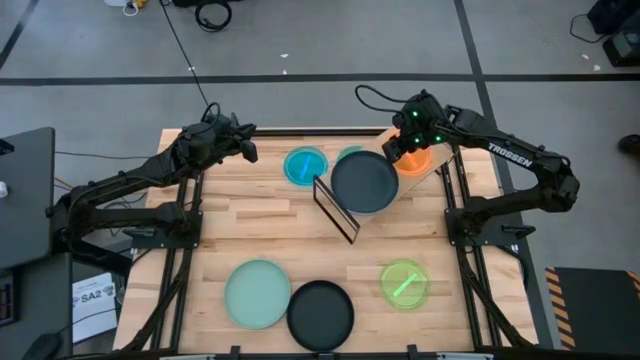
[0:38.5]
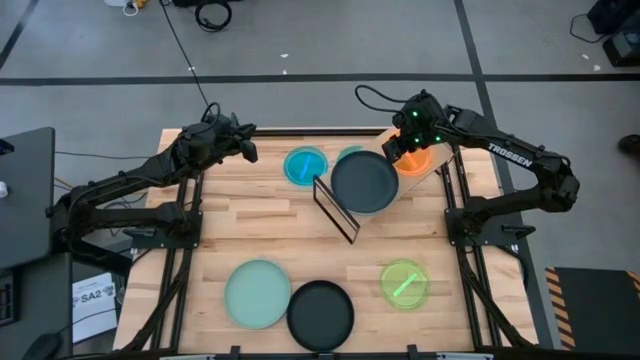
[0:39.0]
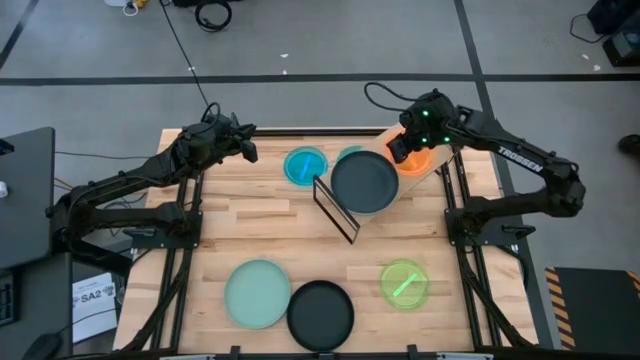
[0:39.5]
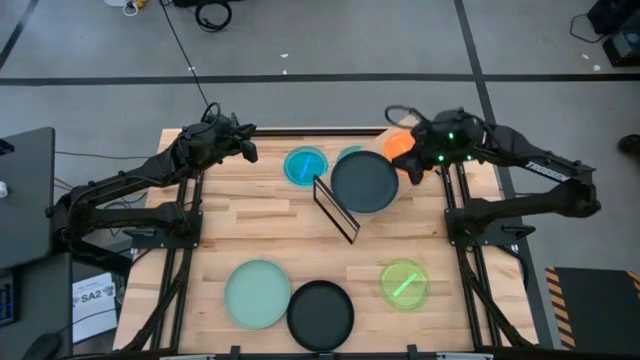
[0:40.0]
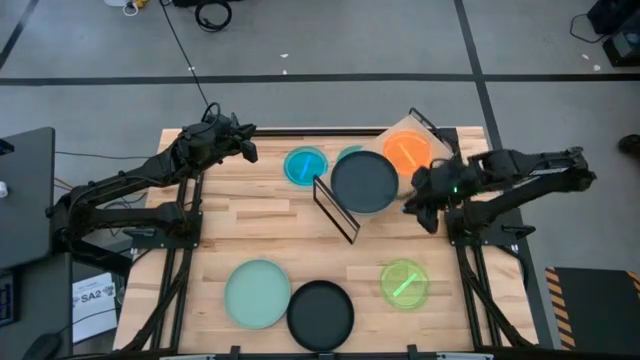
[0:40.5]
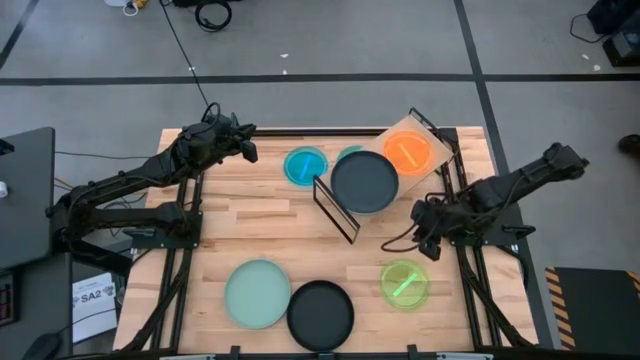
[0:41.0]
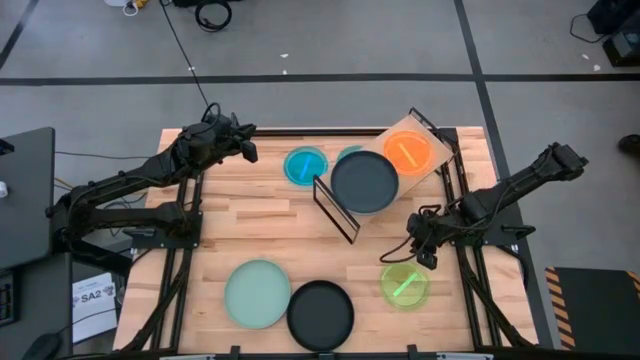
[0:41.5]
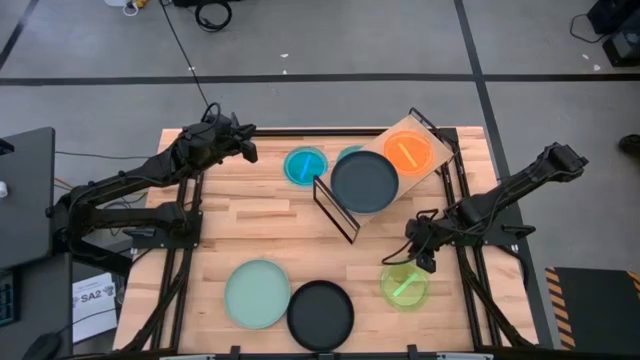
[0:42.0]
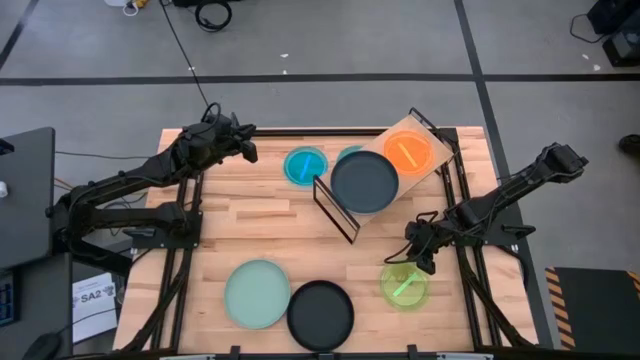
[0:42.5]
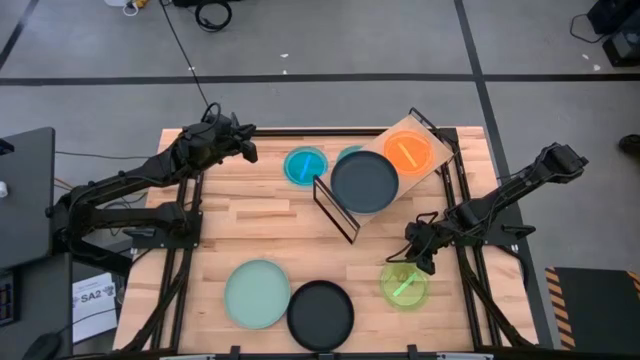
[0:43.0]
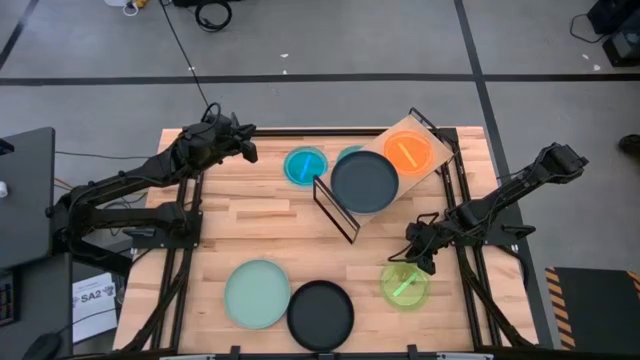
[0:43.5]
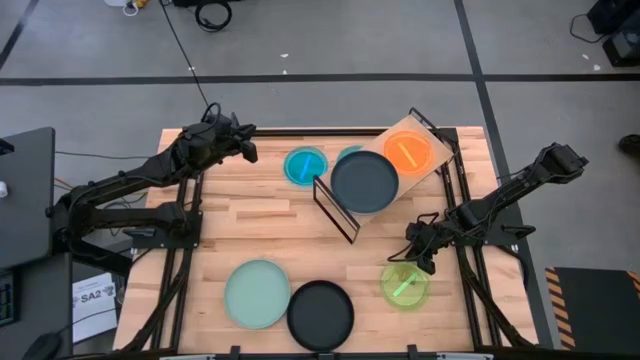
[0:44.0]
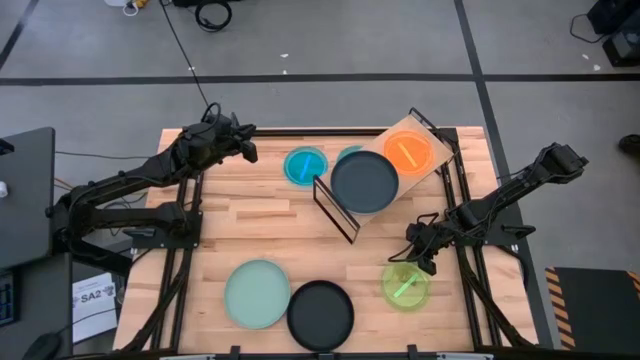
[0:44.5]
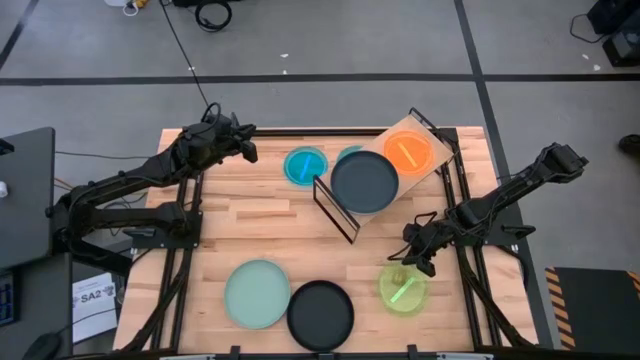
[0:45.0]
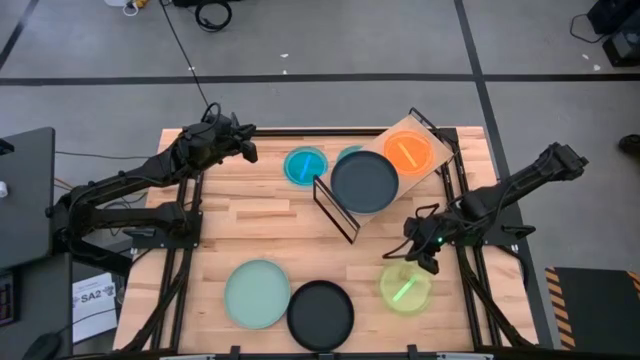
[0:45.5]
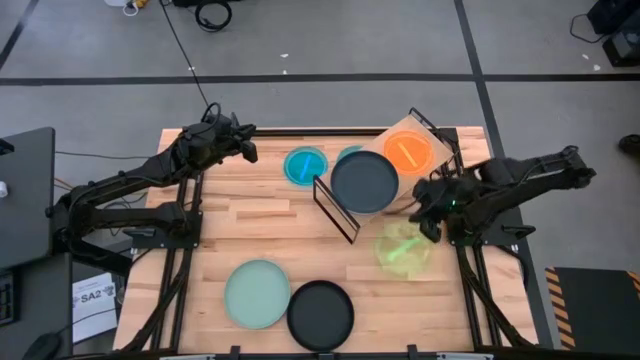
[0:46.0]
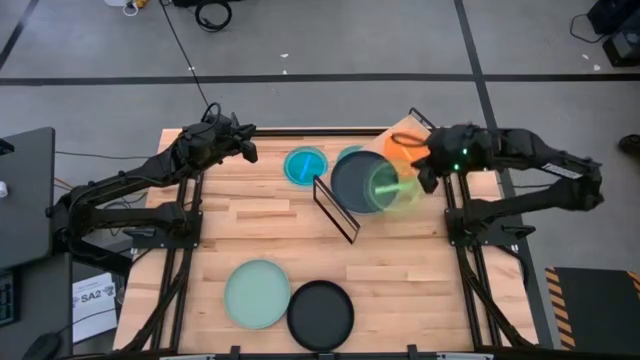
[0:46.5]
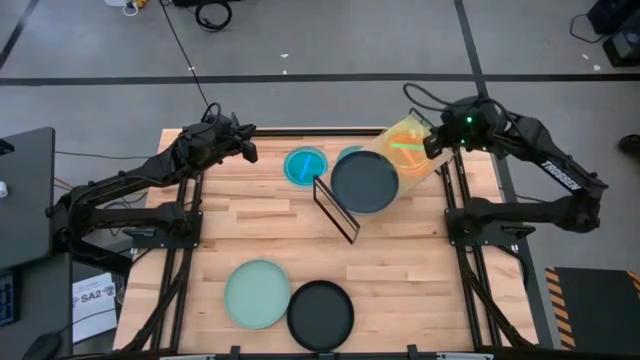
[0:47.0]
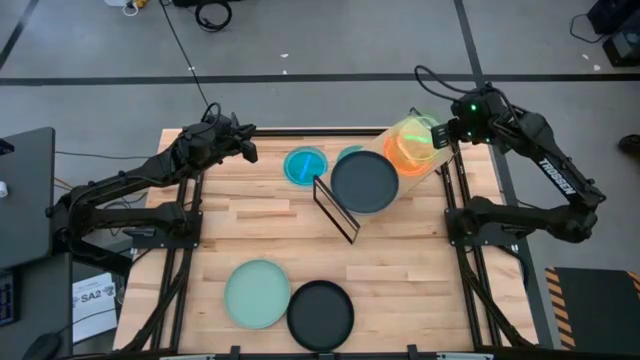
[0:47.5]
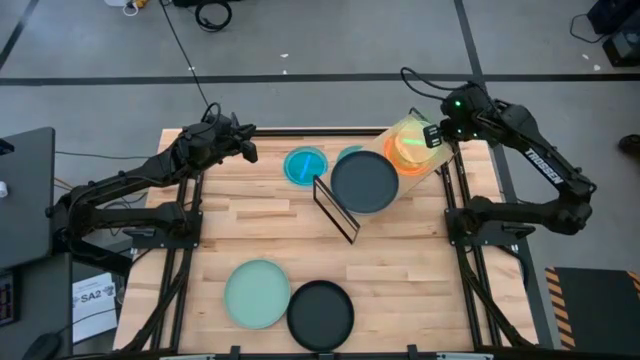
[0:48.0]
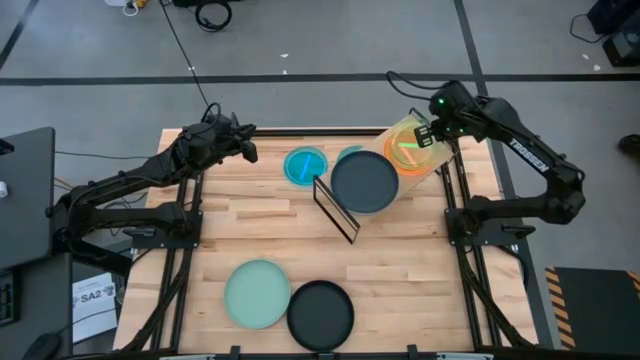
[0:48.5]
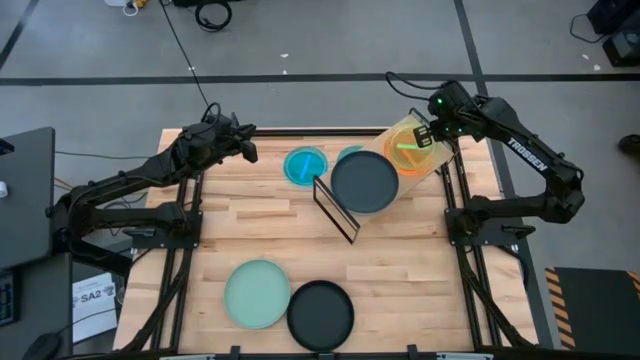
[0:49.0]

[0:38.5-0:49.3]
Task: Place and stack plates onto a shelf
Stack the small green plate on top of the transparent small orange plate on the shelf

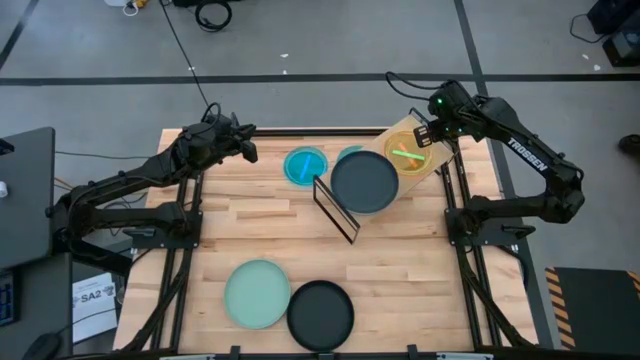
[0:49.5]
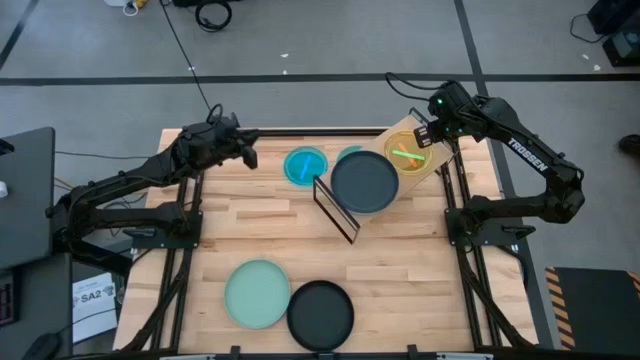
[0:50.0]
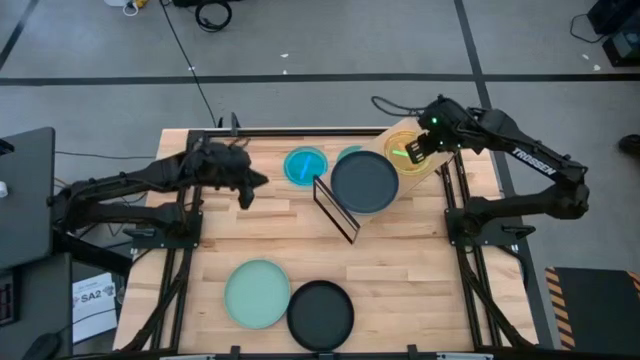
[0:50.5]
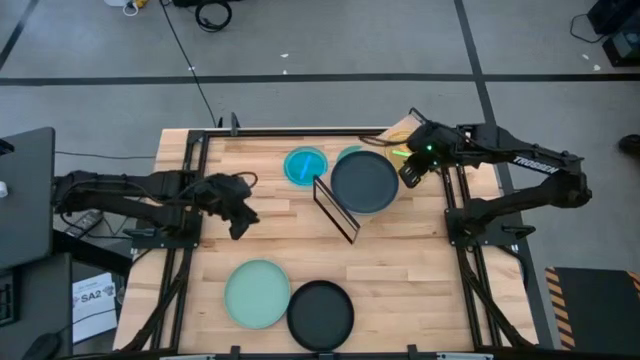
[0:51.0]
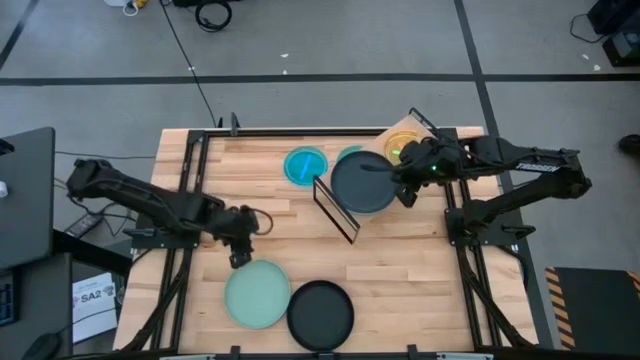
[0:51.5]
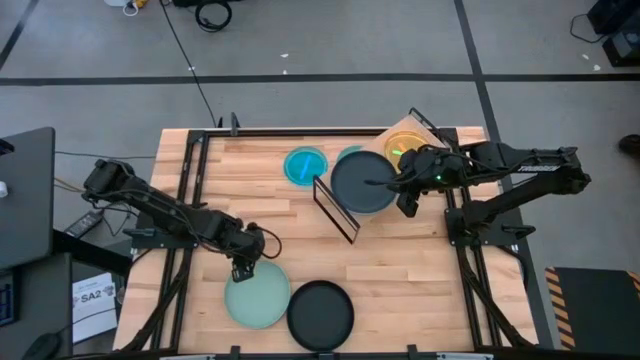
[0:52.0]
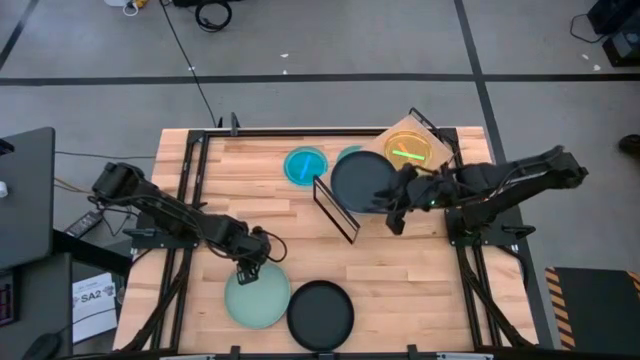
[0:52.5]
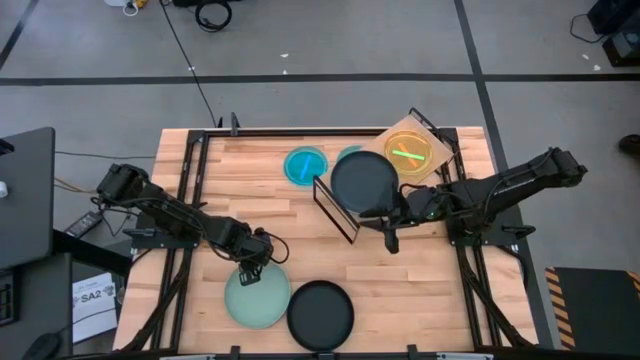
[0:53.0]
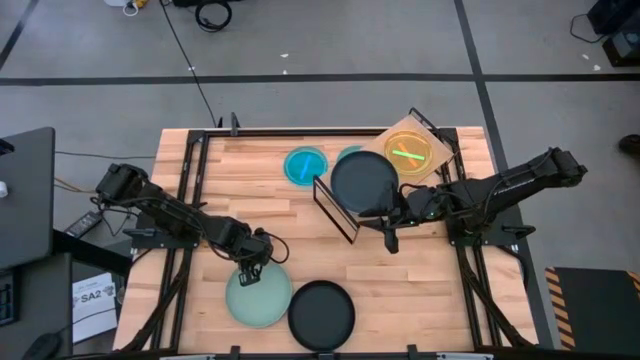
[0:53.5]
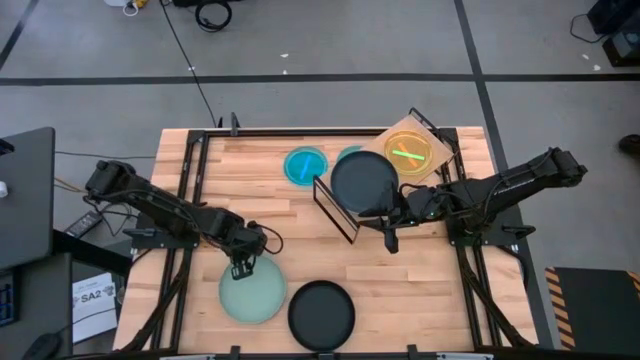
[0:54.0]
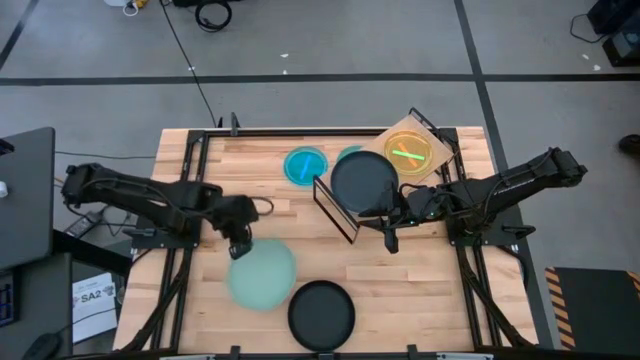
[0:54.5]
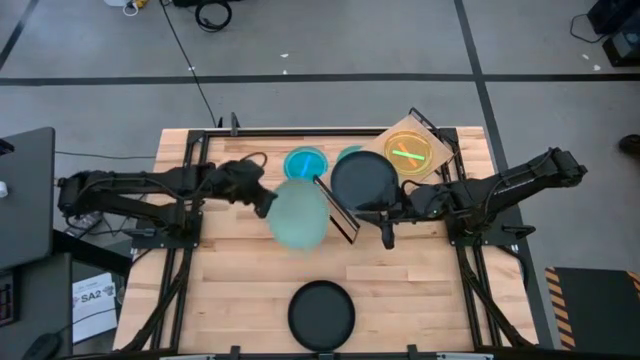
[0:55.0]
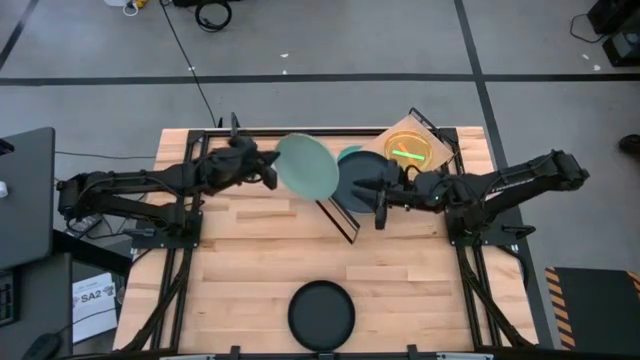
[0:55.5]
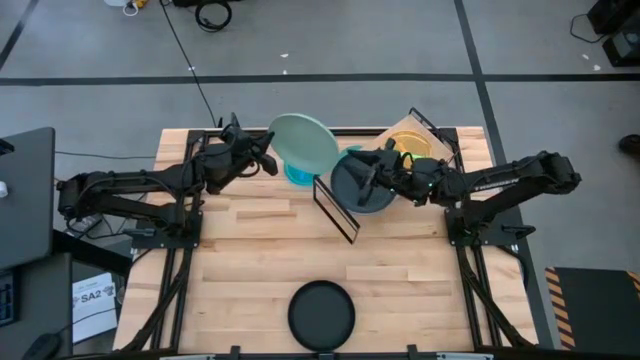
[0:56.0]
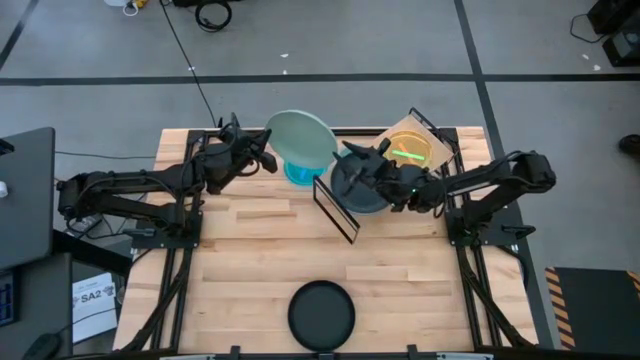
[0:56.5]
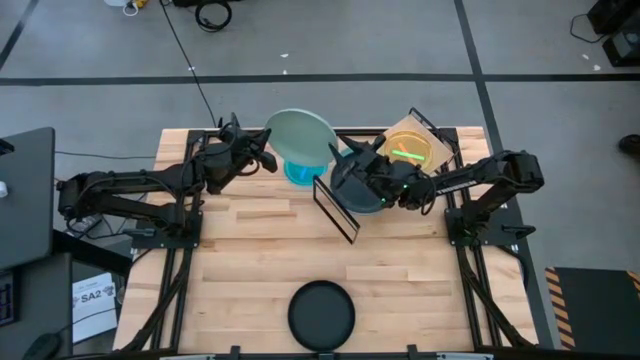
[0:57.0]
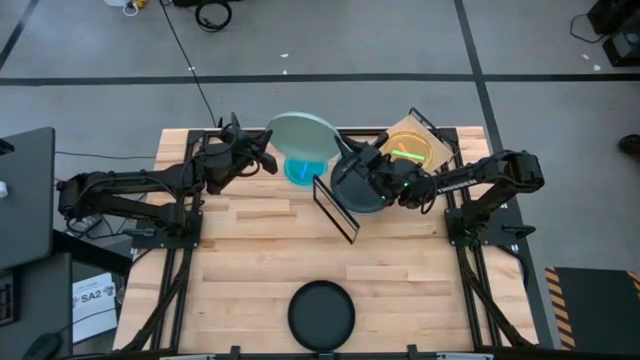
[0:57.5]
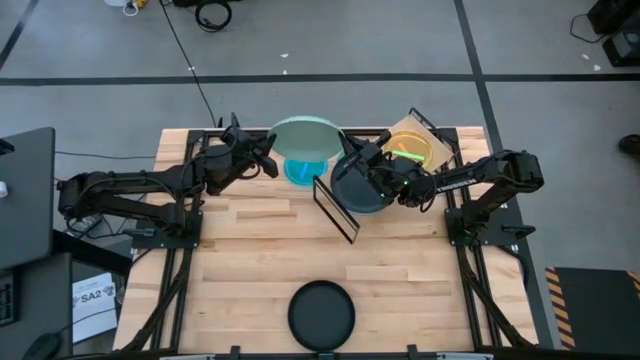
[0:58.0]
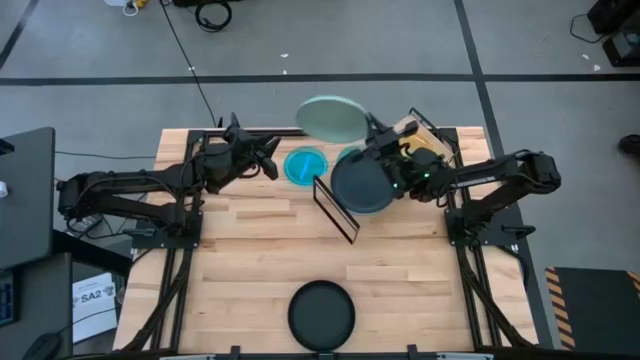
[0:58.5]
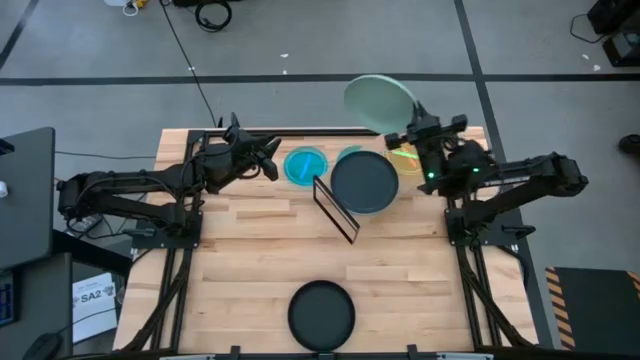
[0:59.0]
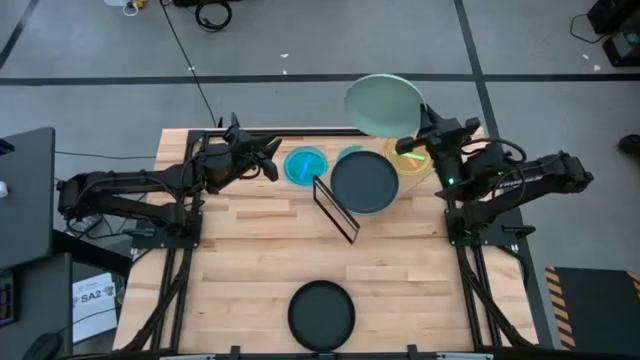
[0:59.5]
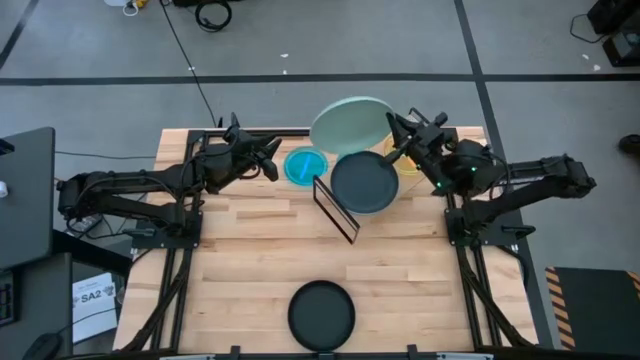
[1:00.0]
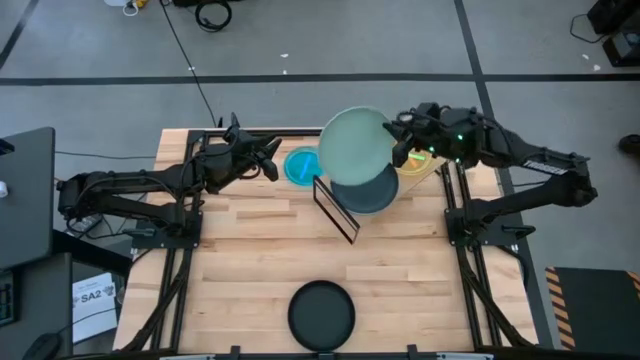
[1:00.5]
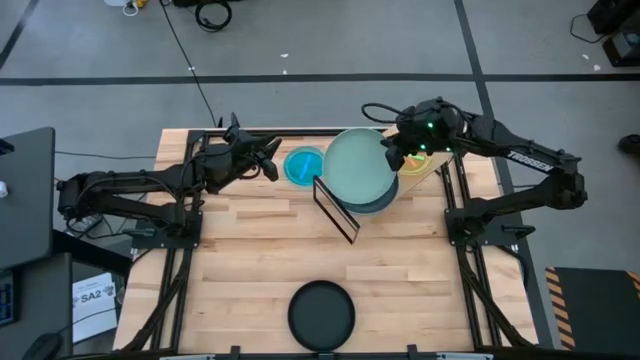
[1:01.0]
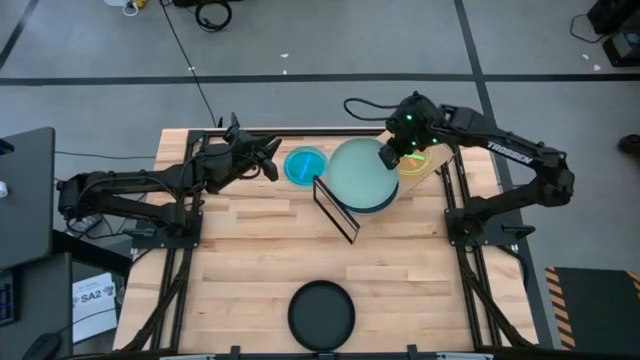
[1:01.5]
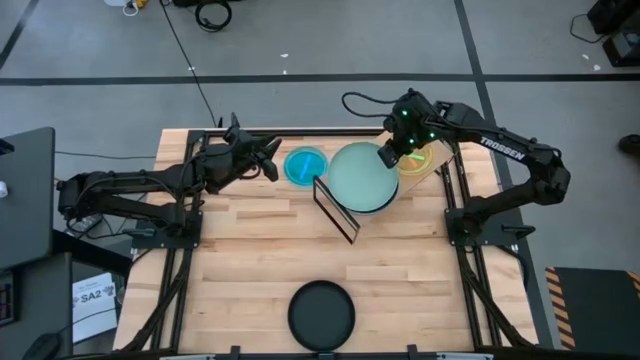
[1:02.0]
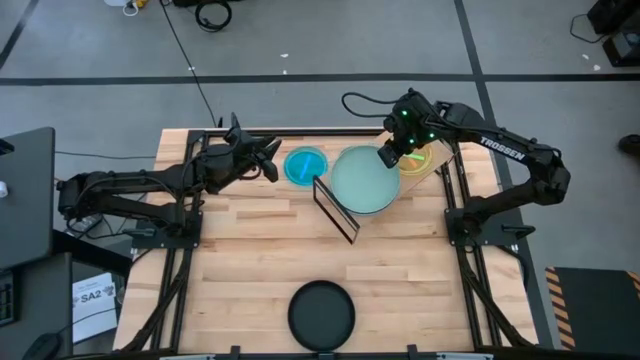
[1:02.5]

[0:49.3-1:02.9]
Stack the big gray plate on top of the big black plate on the shelf
